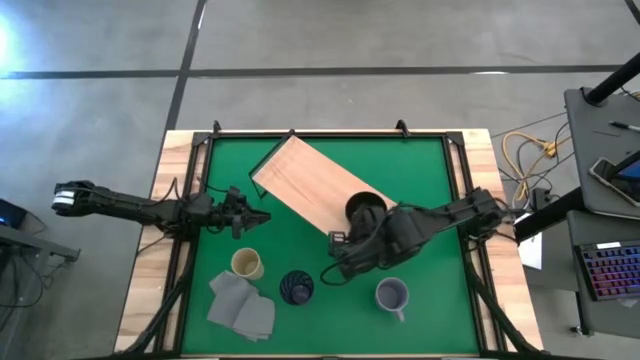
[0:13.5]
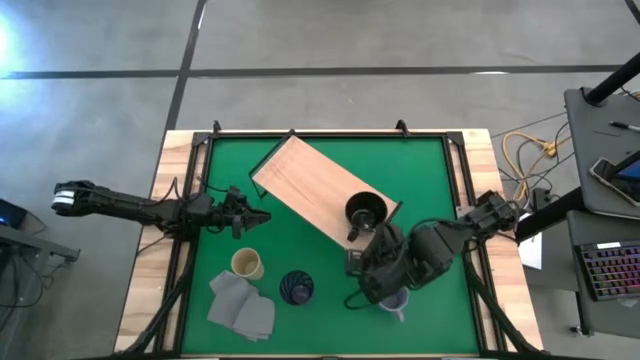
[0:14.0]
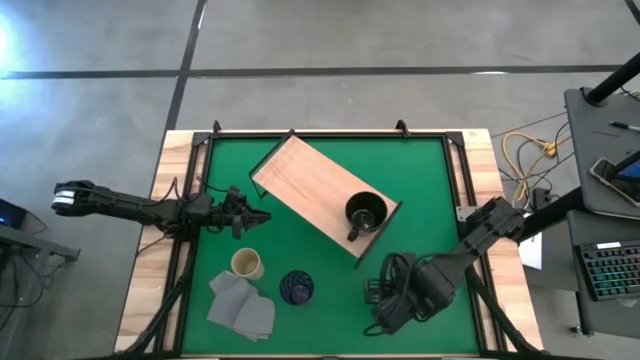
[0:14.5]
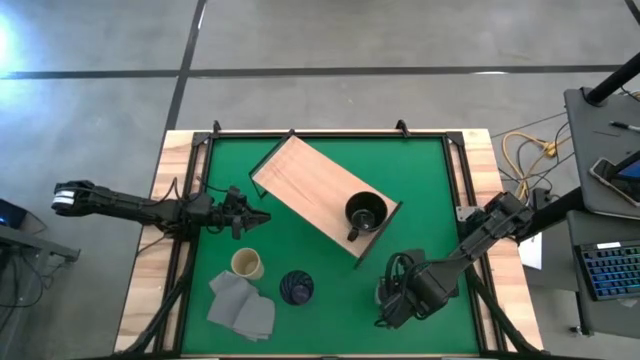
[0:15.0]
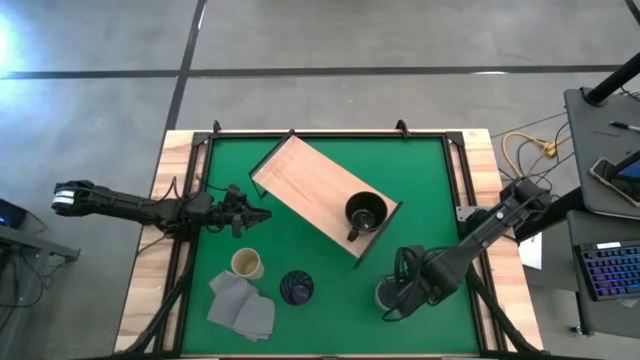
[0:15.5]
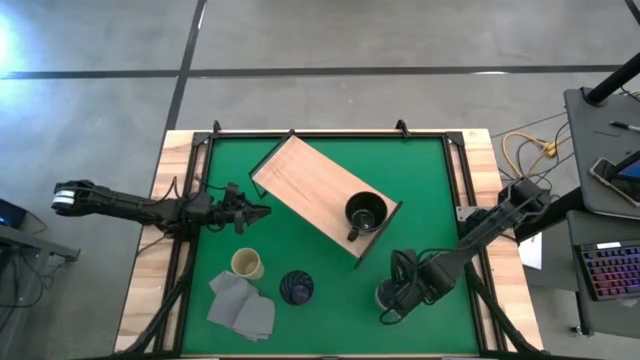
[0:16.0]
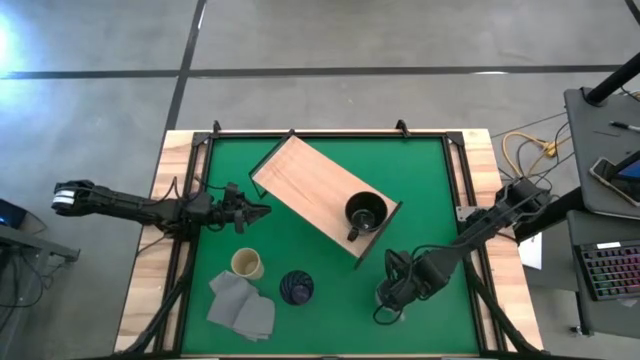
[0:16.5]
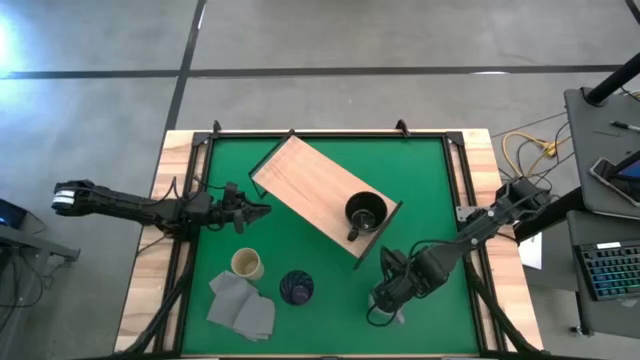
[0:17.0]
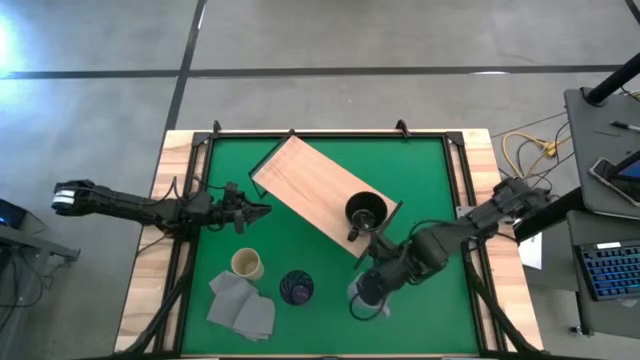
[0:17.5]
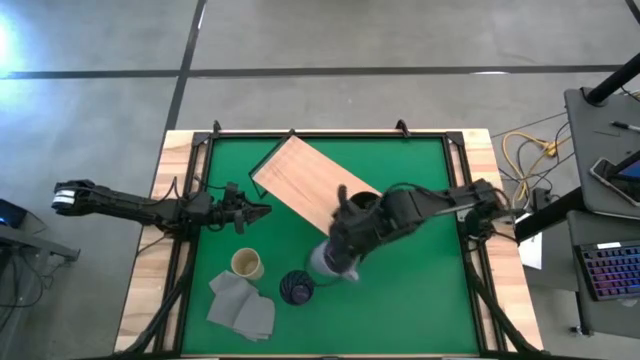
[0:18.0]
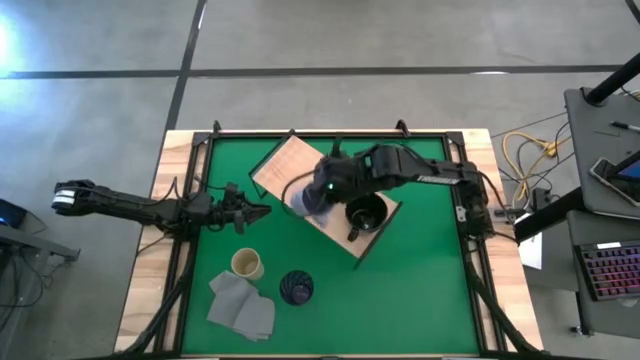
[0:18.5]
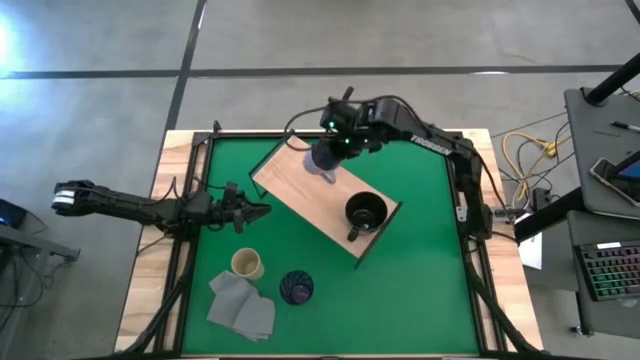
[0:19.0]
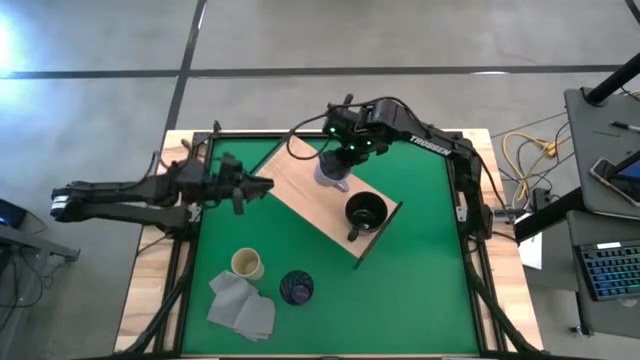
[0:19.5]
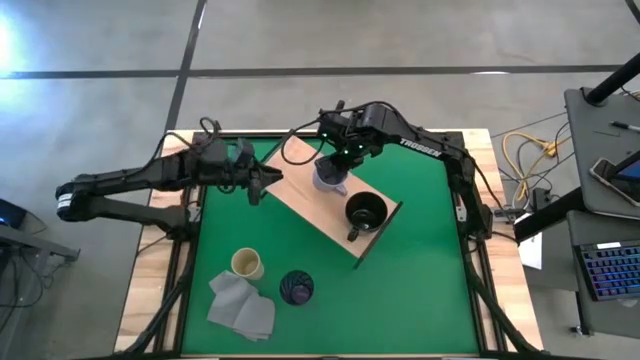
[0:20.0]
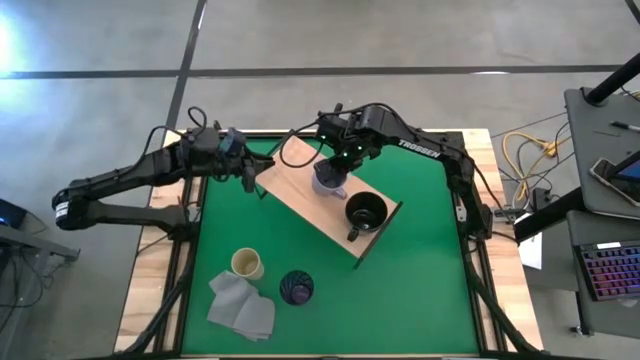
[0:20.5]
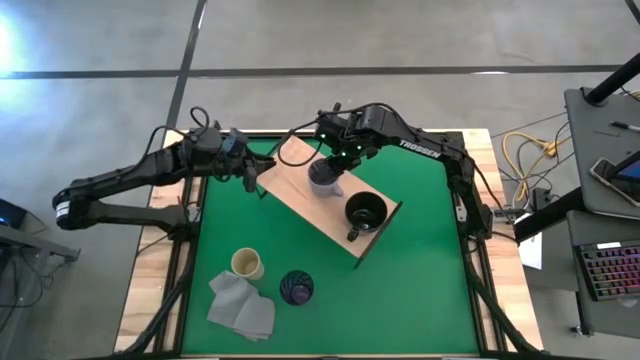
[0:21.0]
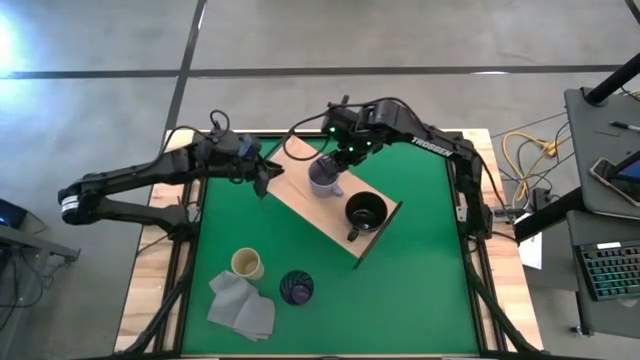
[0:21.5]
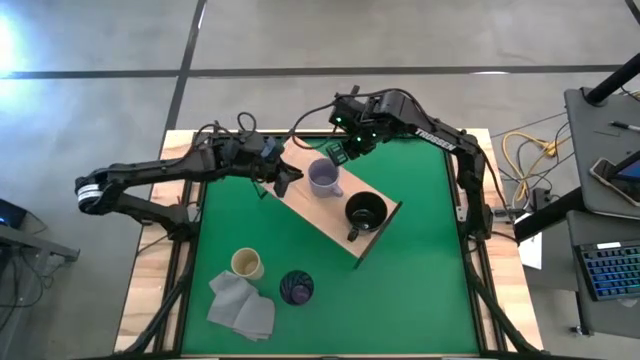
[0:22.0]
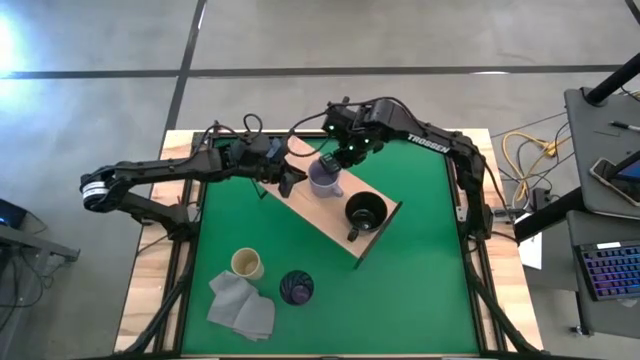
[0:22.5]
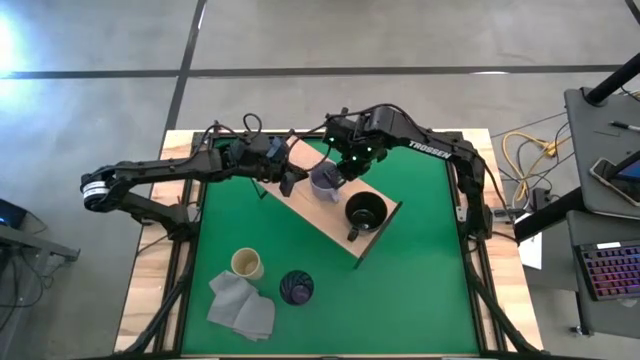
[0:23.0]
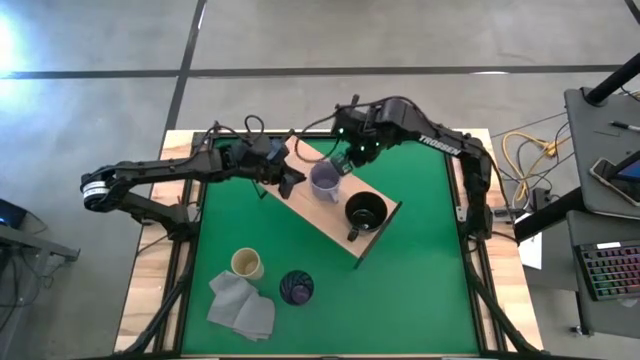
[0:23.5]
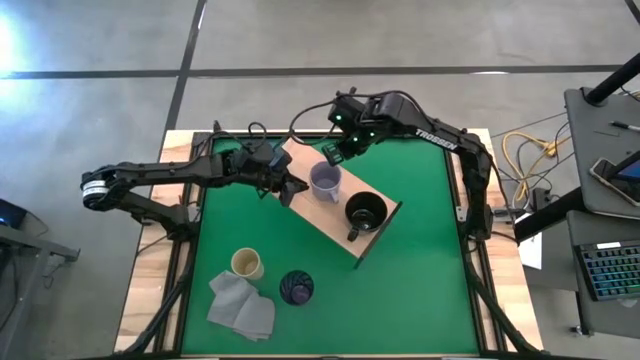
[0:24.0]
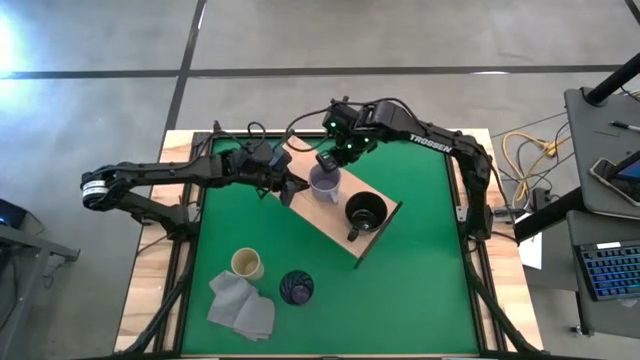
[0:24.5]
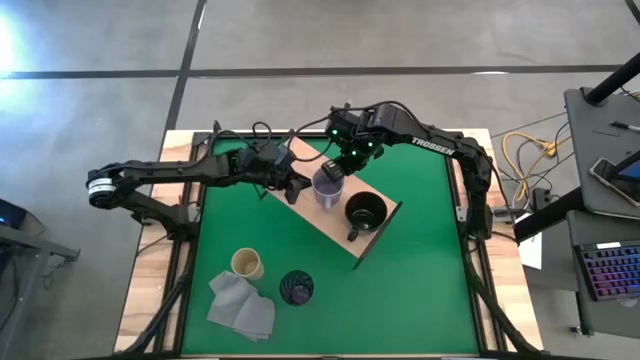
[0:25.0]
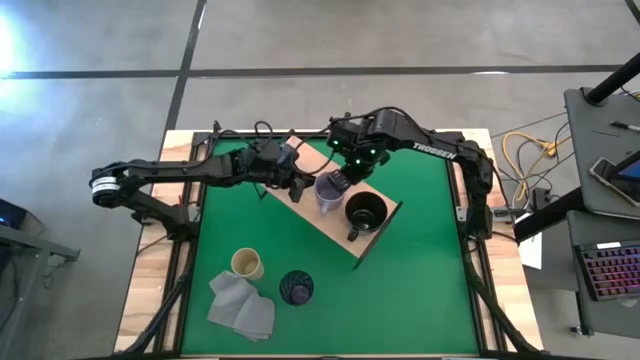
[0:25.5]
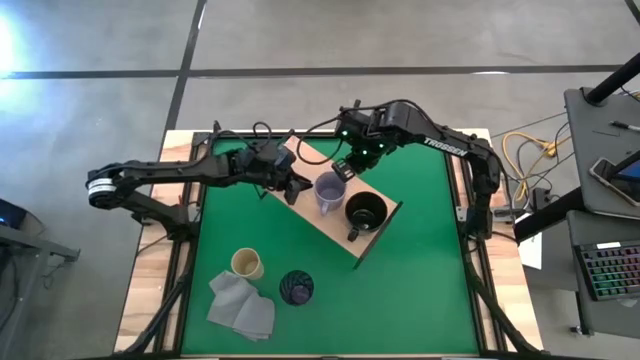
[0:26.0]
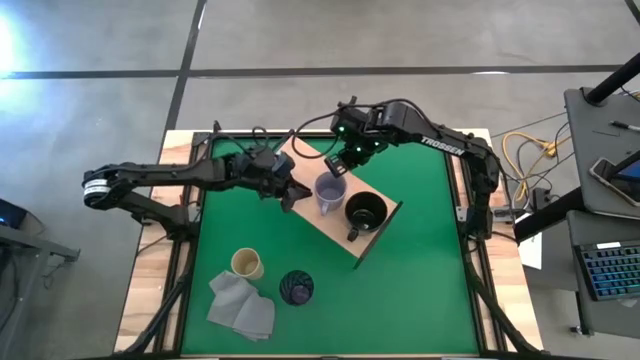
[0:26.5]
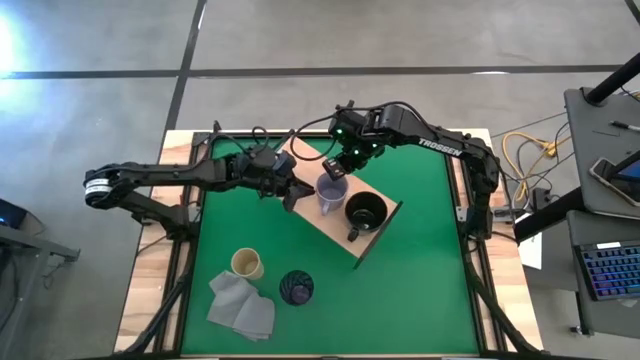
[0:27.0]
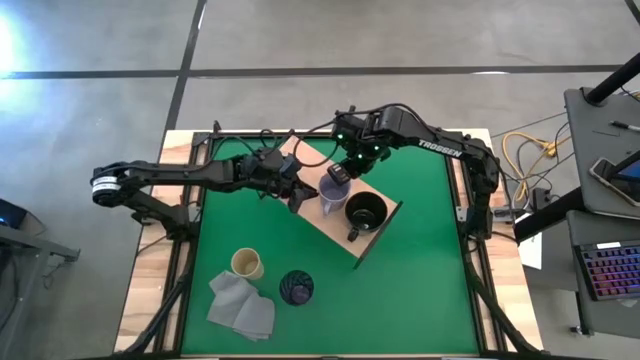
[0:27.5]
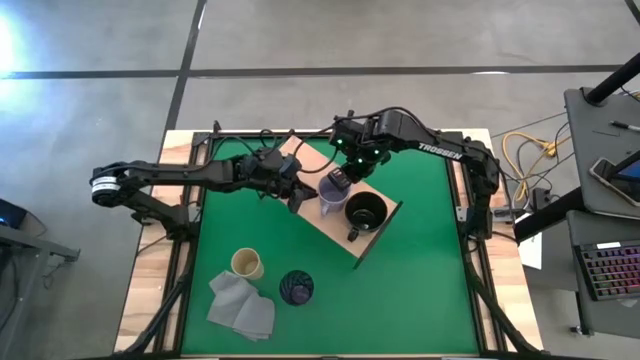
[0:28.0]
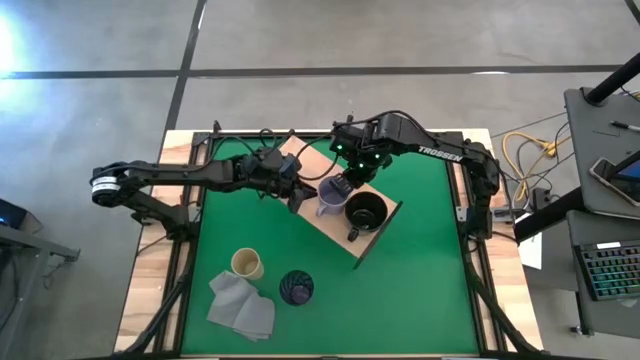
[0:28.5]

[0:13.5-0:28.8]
Task: Stack small to large cups/mugs on shelf
Put the blue mug on the shelf

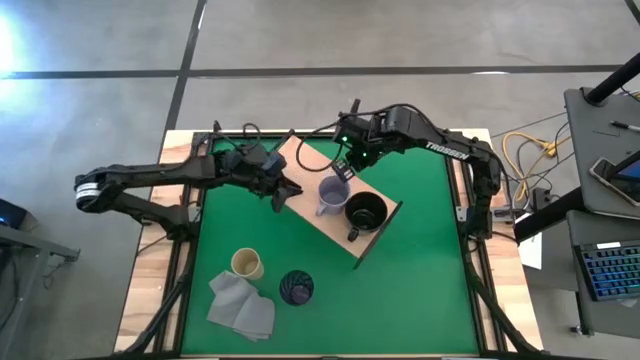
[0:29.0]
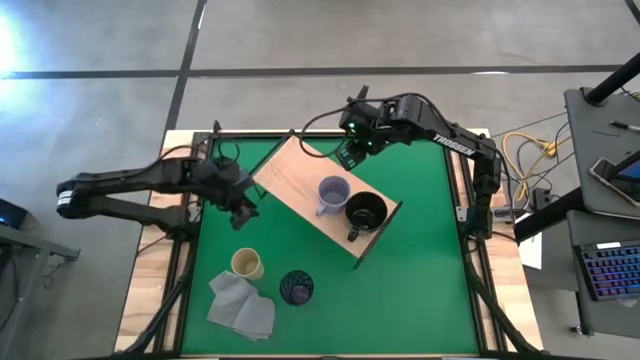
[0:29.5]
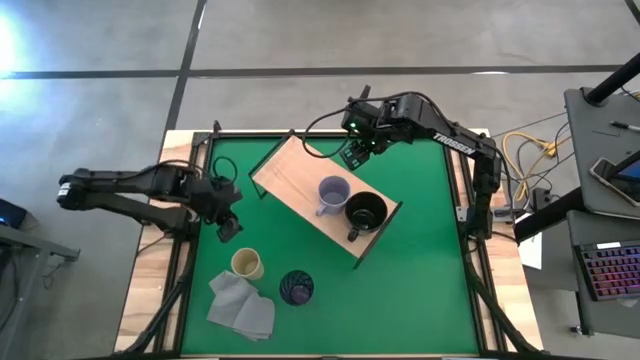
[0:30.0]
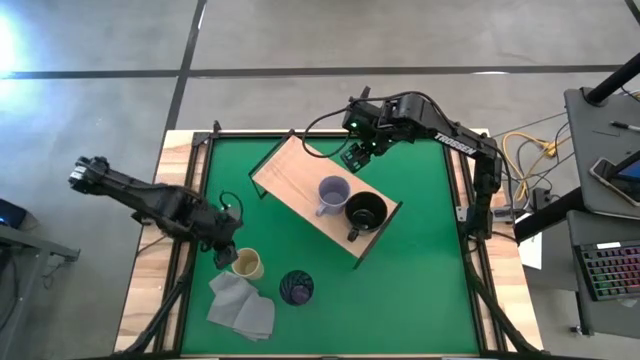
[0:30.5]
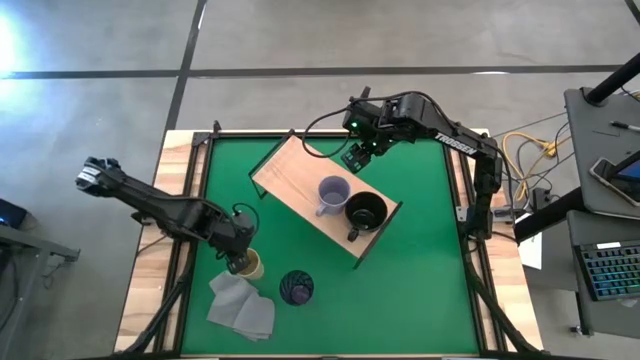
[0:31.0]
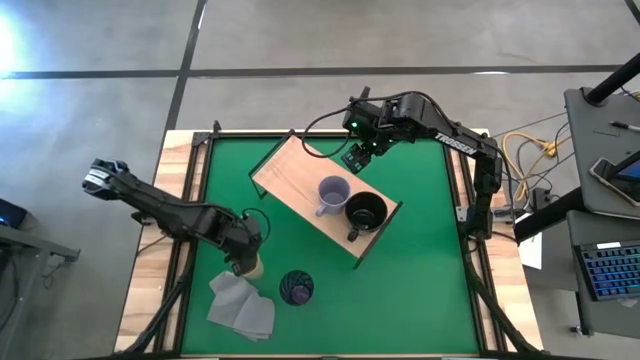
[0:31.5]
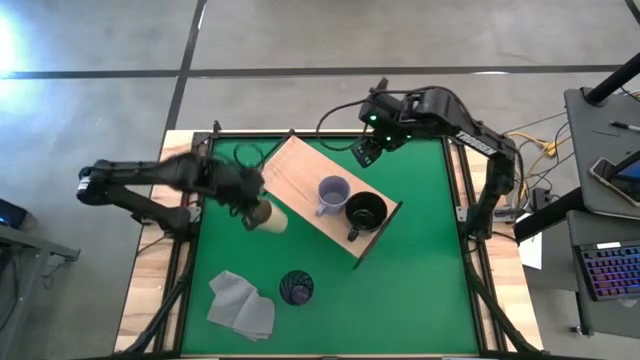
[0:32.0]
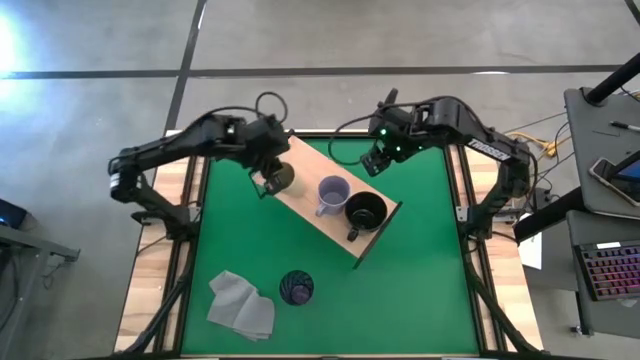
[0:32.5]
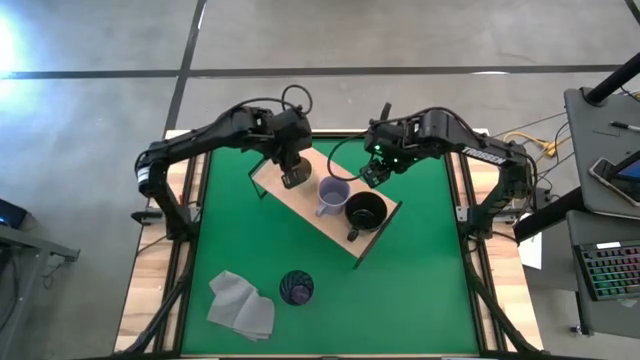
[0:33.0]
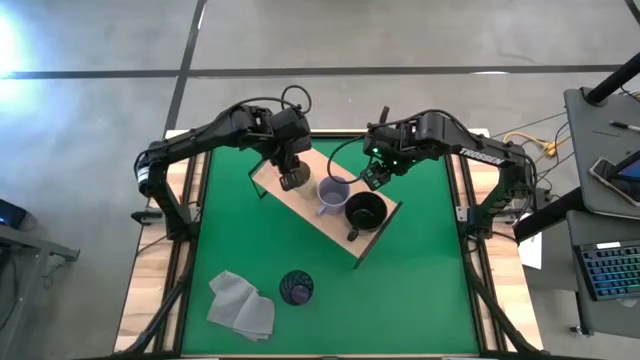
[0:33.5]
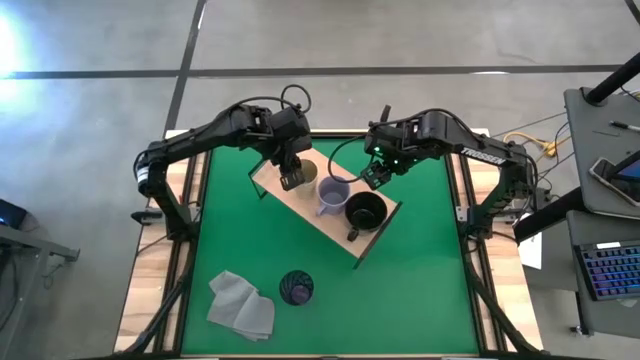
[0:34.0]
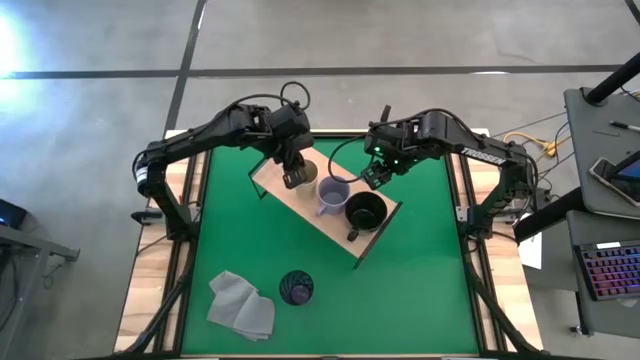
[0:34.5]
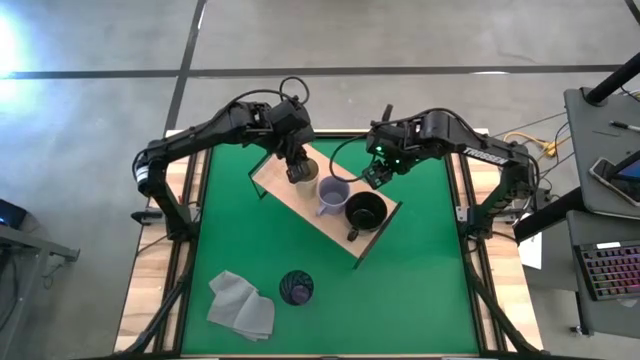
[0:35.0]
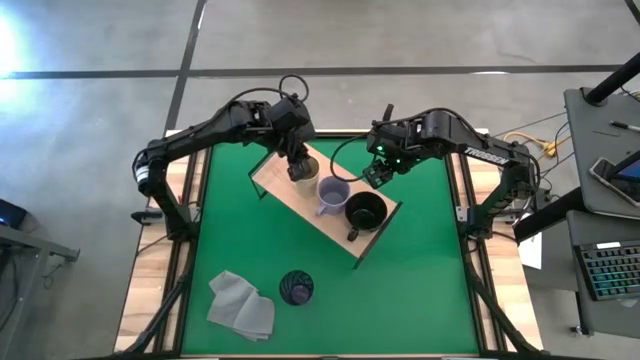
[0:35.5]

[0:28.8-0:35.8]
Put the brown cup on the shelf
